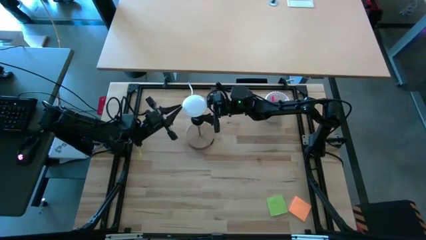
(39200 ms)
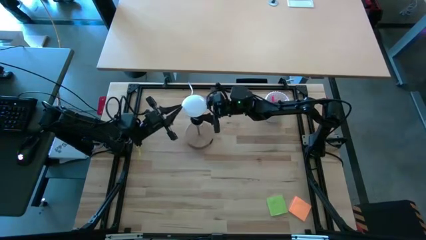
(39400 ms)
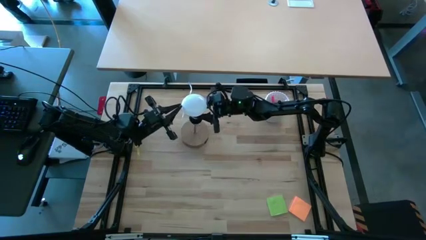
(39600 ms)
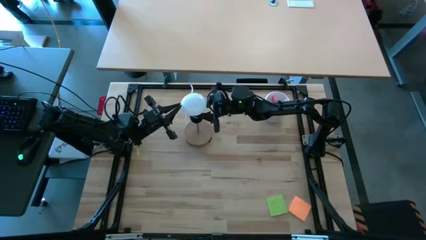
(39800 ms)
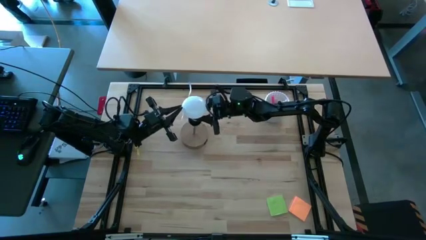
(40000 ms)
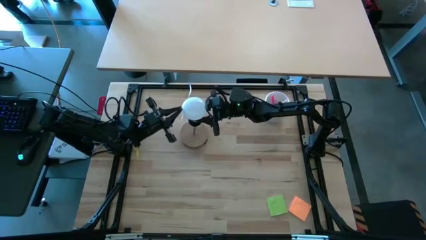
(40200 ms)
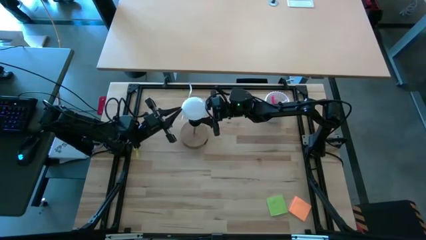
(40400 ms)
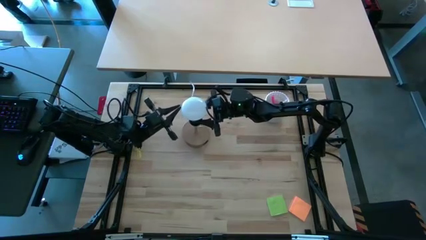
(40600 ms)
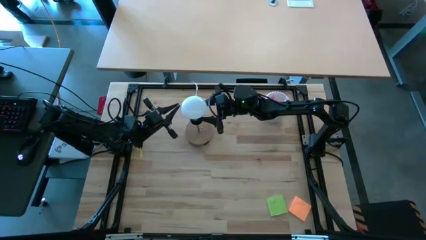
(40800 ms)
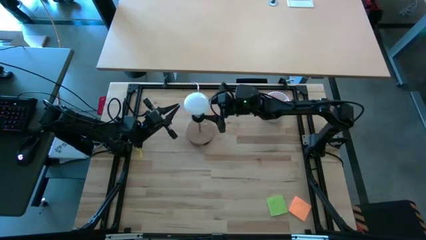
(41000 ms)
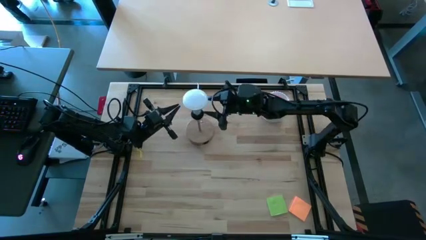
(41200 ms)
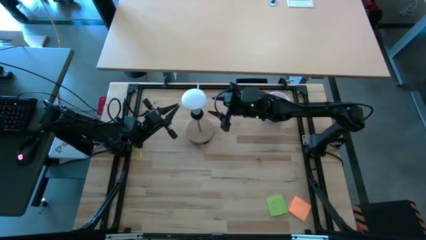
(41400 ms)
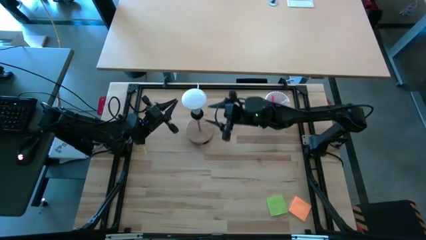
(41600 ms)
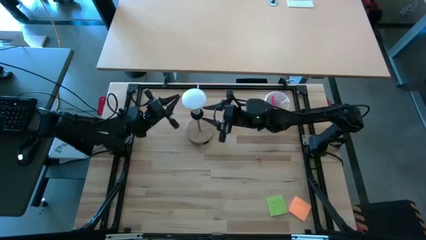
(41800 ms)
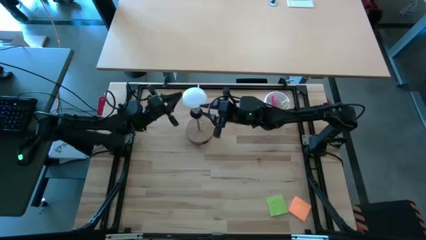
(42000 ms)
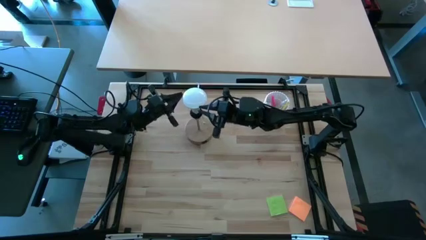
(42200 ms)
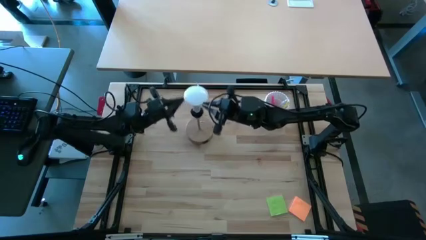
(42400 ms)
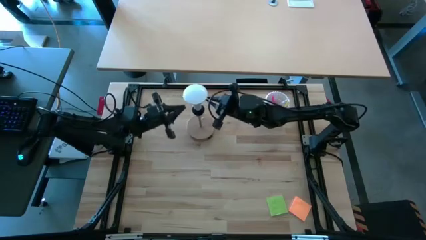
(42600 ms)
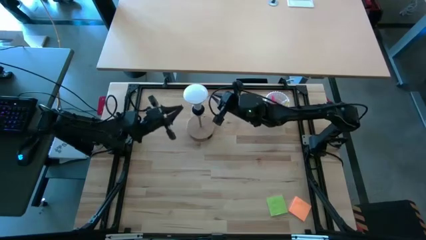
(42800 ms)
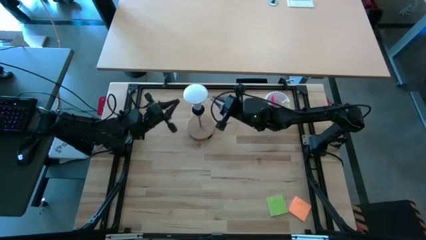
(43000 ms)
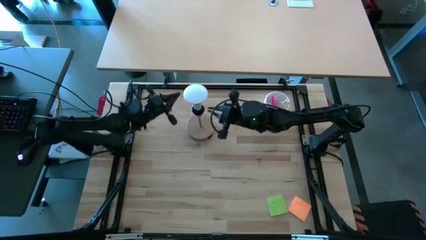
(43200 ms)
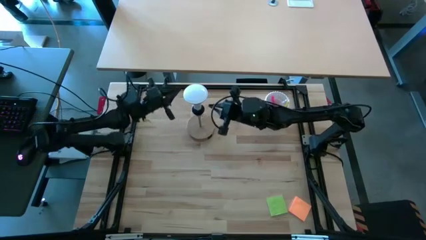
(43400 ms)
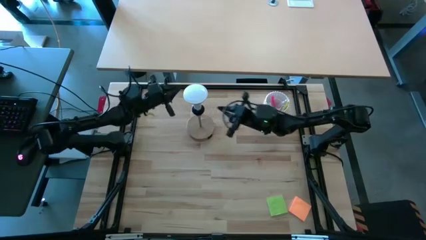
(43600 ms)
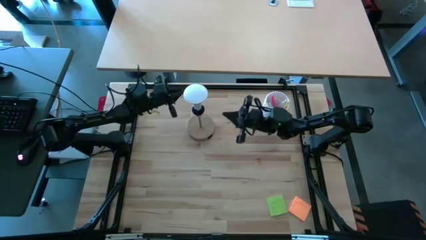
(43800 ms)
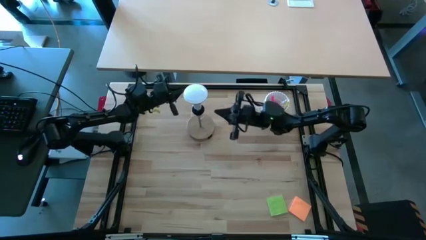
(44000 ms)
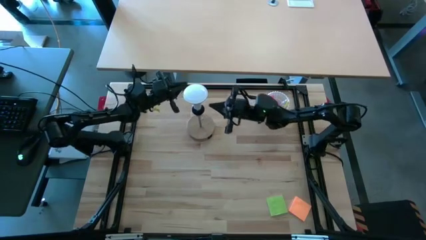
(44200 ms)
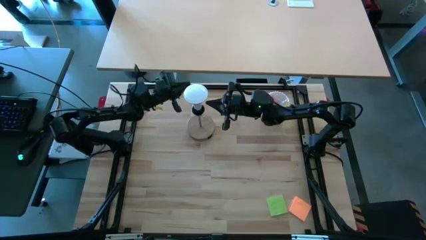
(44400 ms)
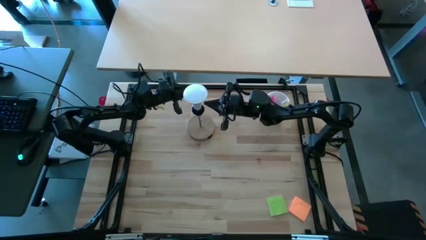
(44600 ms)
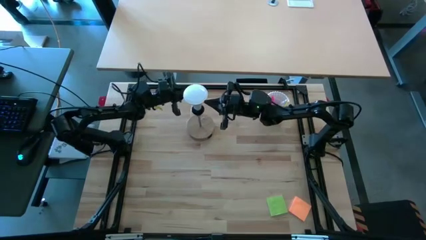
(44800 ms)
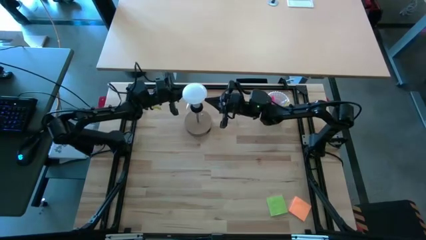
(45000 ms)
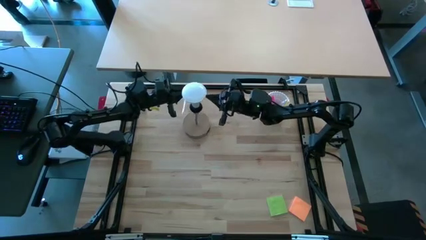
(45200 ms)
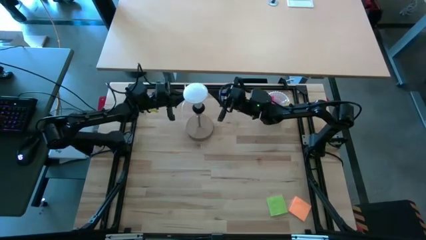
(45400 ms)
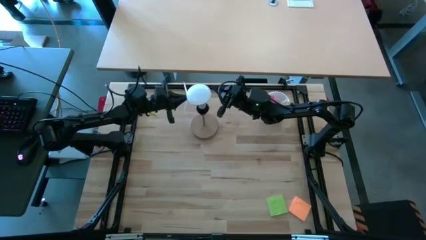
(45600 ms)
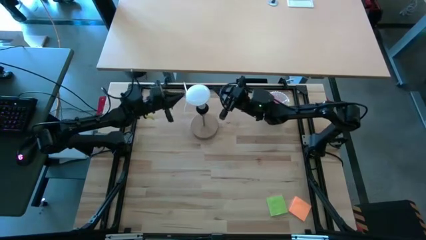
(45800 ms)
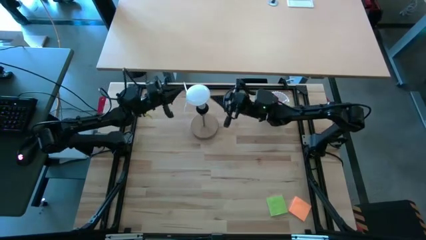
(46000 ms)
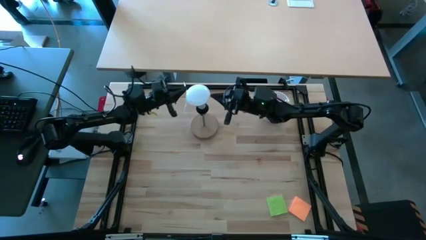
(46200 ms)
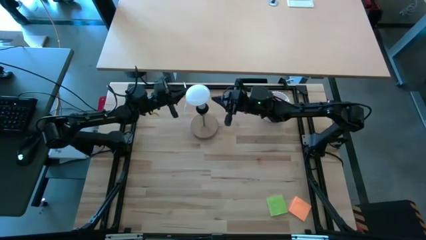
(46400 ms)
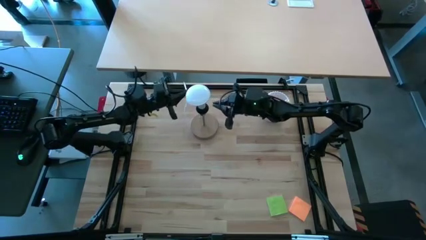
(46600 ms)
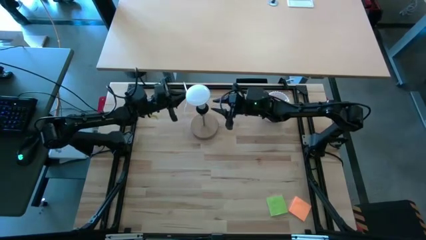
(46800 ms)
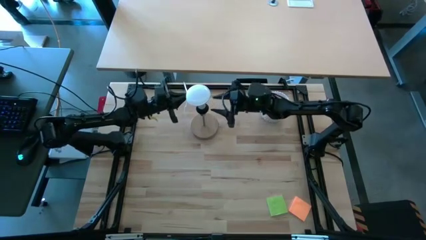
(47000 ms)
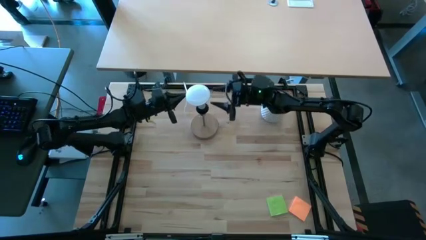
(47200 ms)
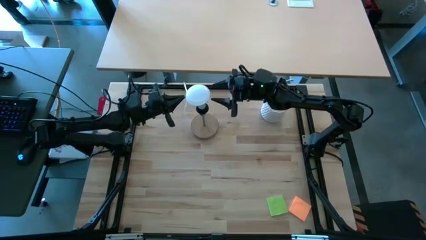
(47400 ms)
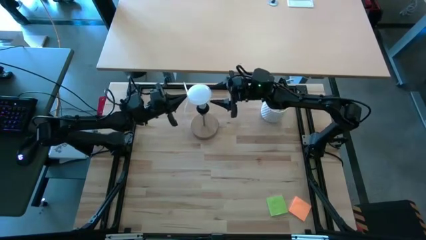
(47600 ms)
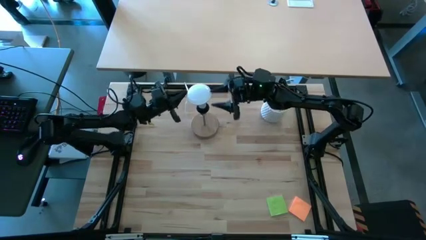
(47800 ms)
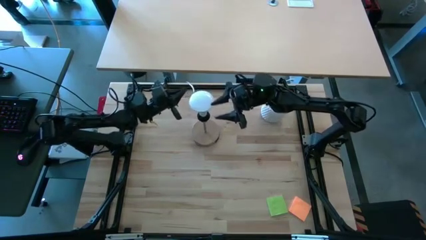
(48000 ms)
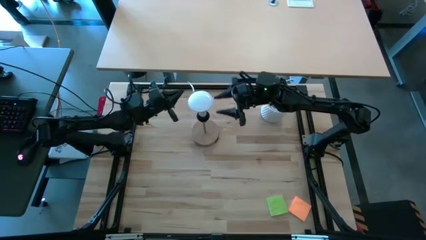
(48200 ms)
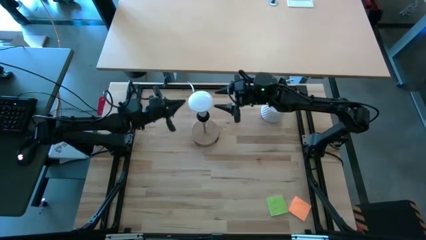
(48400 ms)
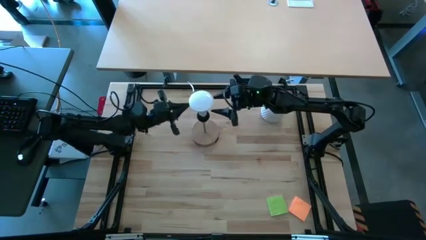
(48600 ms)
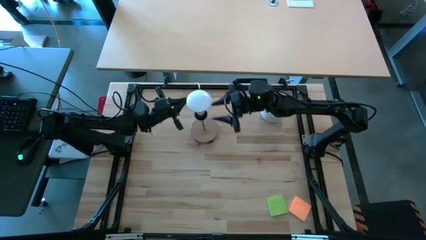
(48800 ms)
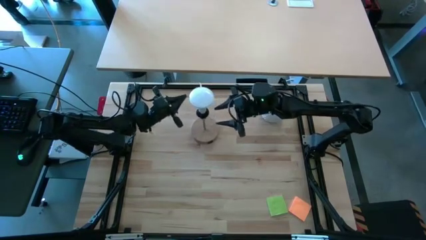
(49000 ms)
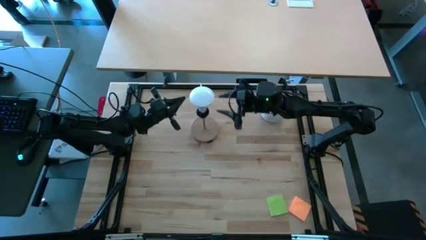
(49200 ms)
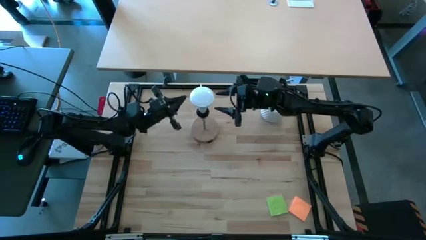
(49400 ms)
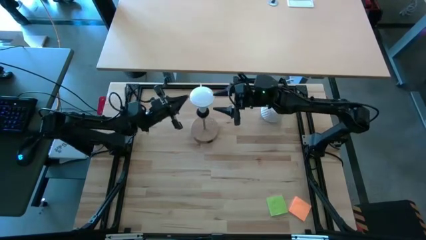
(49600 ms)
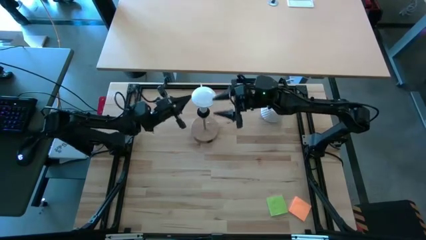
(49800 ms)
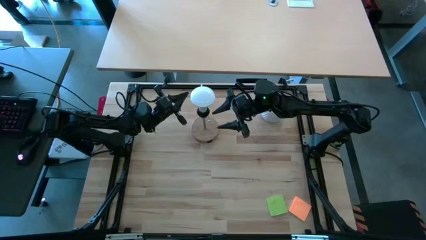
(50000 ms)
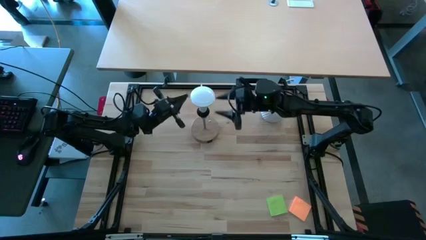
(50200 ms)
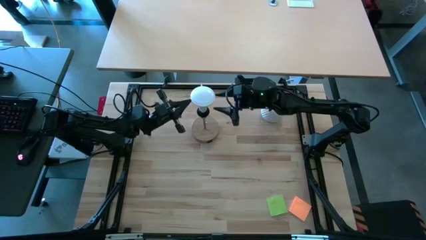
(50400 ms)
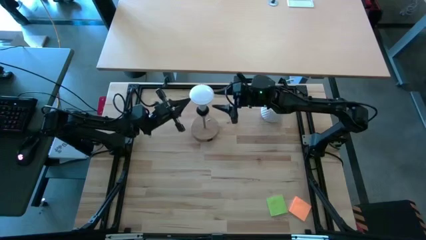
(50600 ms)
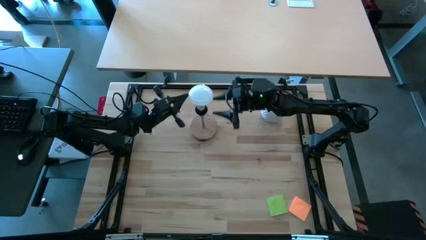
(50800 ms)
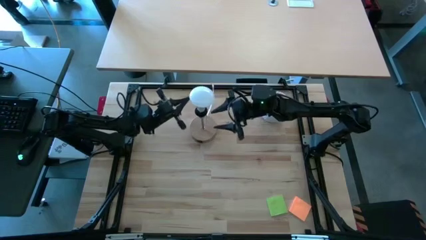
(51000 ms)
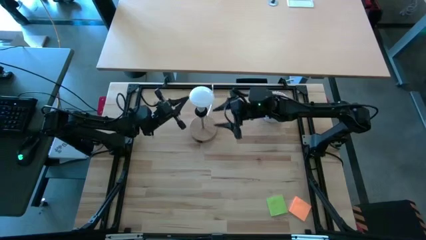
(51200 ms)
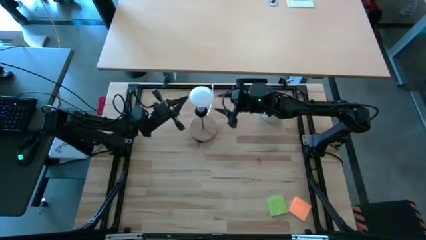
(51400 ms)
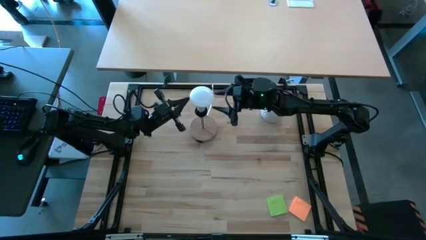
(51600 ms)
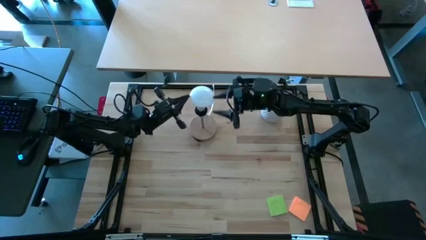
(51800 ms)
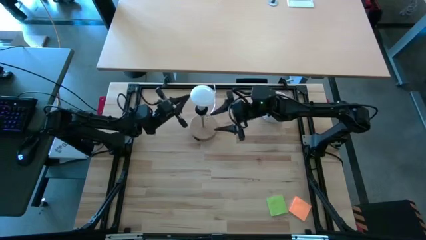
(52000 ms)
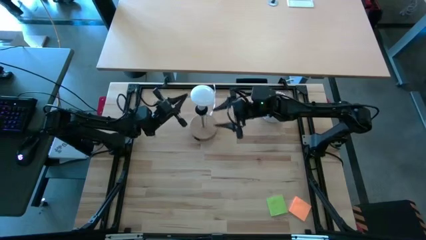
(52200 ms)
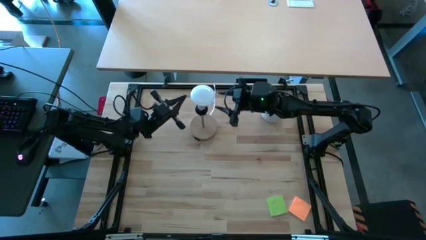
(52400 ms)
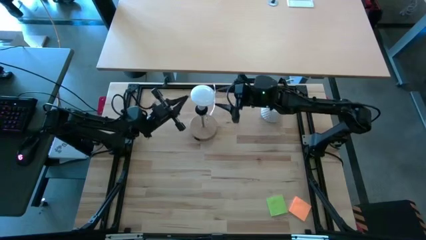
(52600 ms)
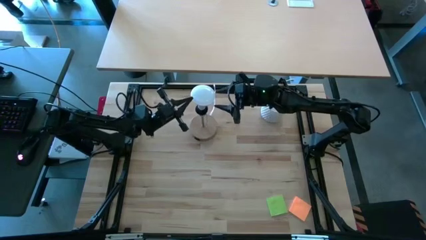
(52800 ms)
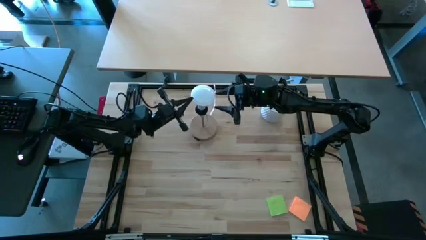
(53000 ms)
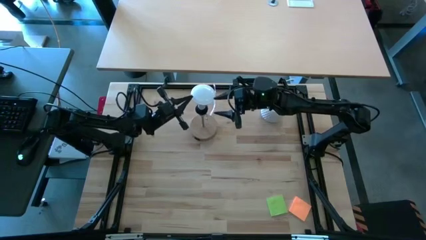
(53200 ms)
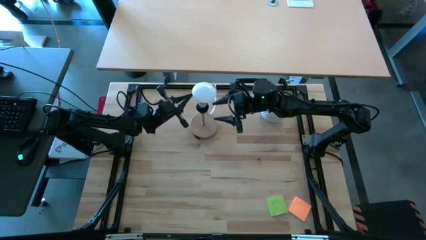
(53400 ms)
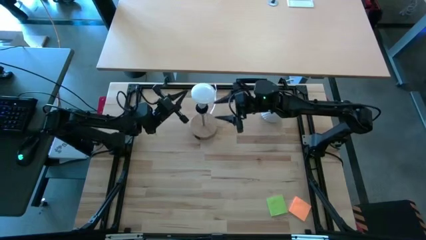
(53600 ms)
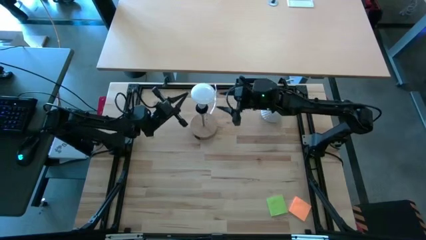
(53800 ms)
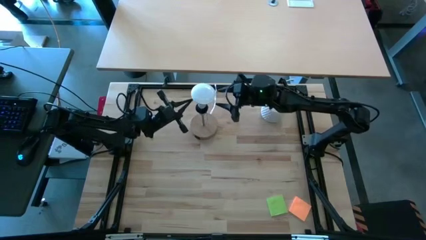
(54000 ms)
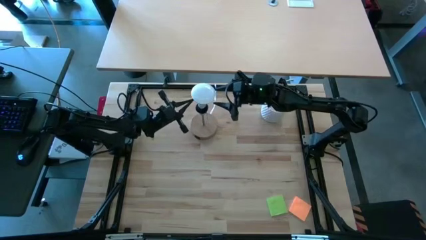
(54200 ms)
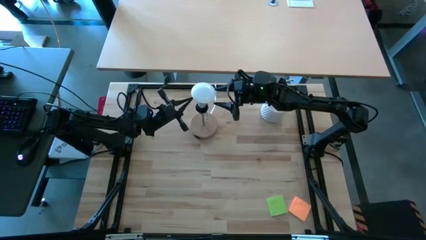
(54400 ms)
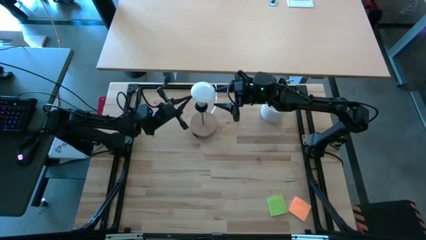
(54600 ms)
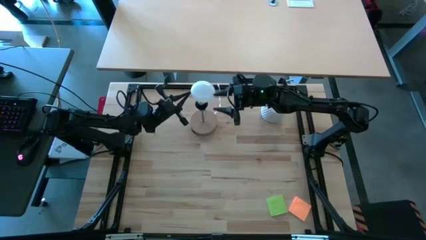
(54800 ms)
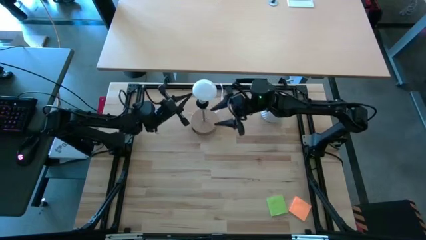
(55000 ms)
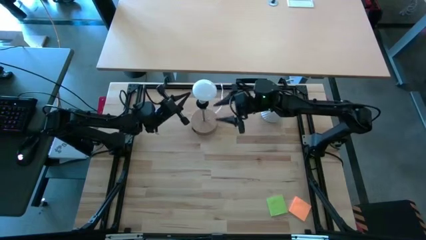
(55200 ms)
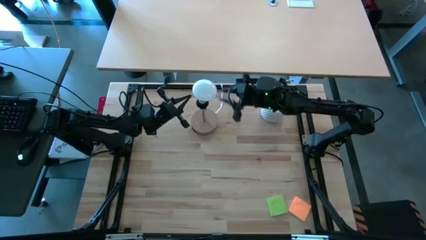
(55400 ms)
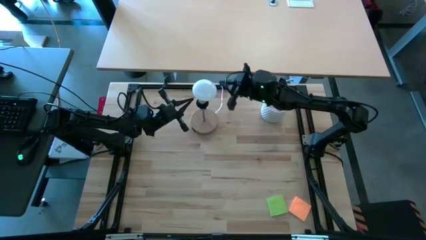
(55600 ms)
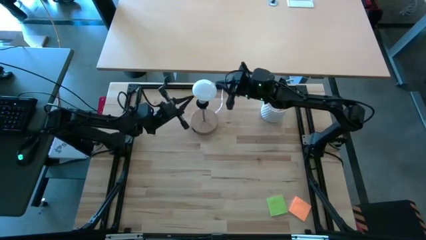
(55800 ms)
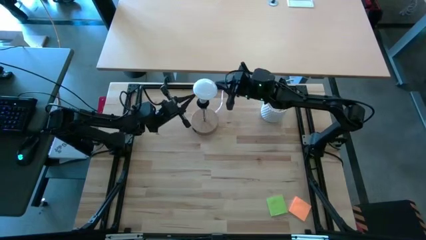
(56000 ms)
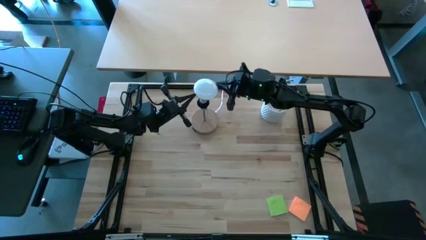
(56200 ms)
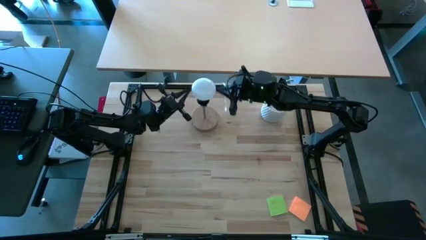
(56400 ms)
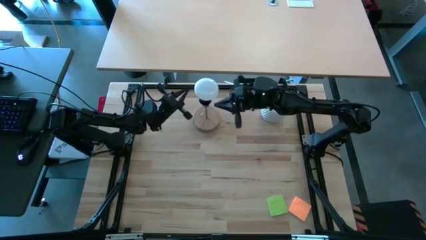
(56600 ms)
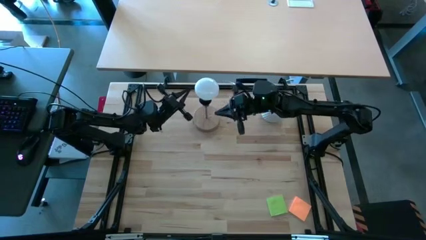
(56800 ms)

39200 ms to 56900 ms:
Task: Screw lightbulb
Insert the lightbulb into the lamp
